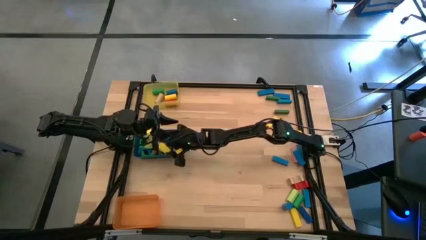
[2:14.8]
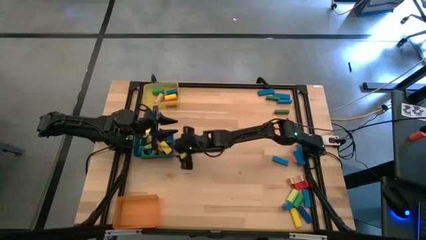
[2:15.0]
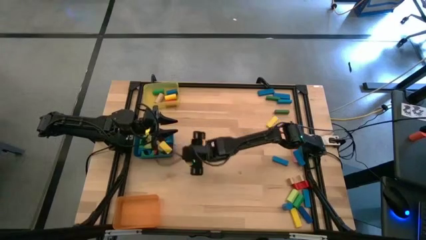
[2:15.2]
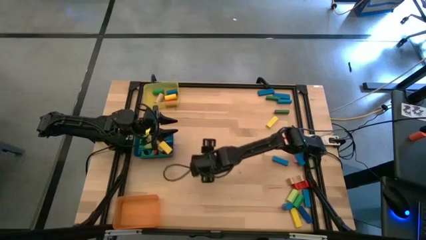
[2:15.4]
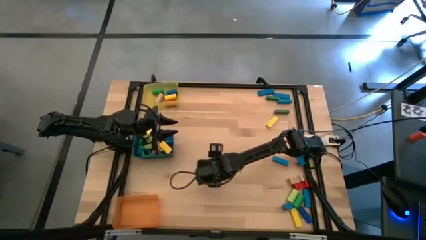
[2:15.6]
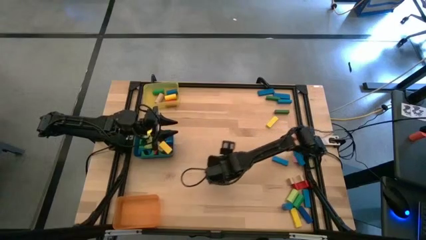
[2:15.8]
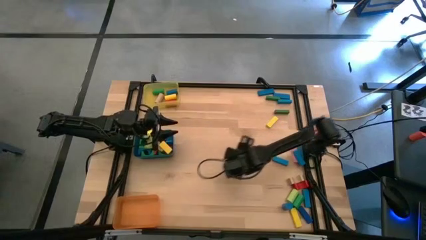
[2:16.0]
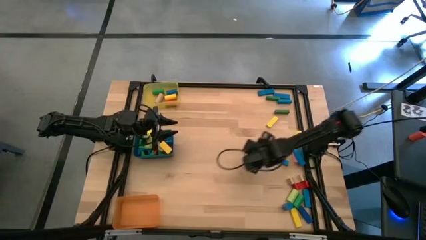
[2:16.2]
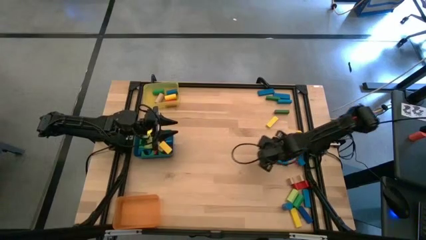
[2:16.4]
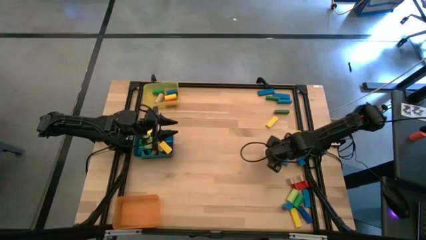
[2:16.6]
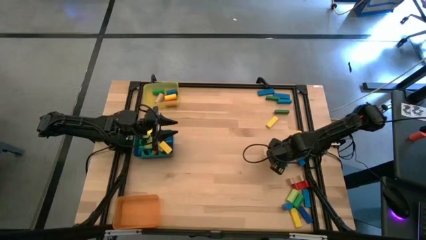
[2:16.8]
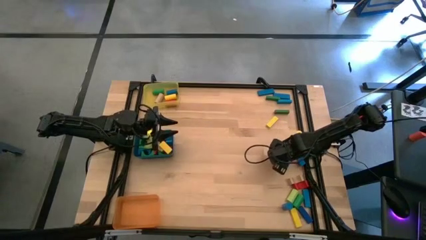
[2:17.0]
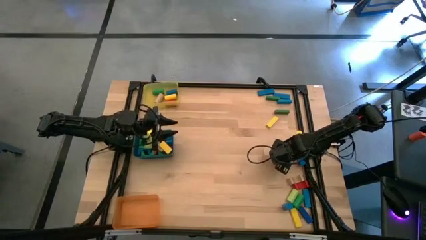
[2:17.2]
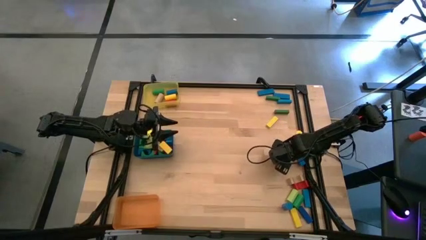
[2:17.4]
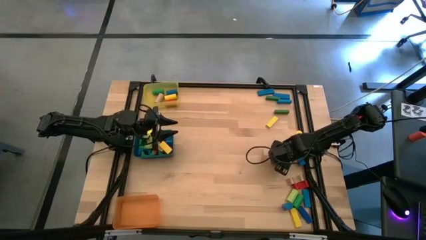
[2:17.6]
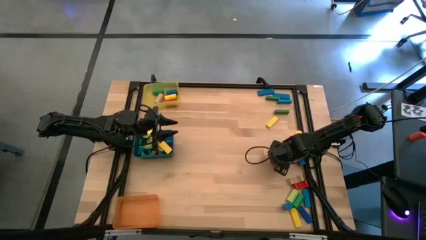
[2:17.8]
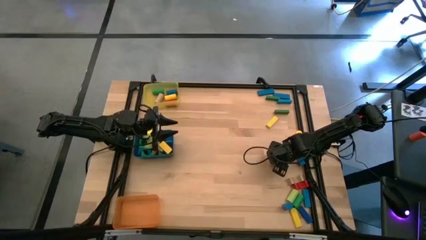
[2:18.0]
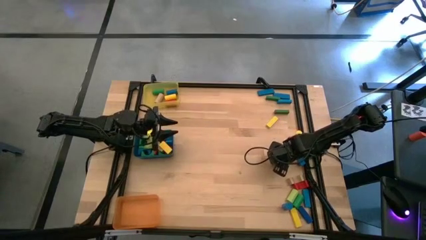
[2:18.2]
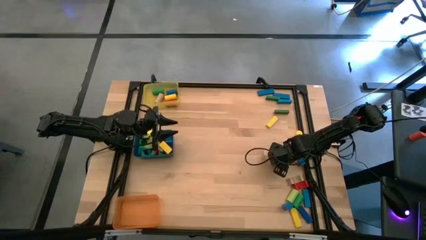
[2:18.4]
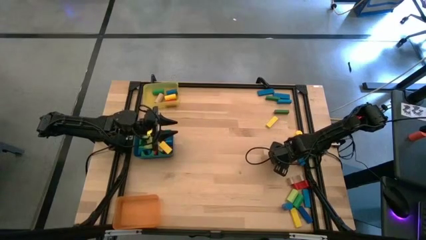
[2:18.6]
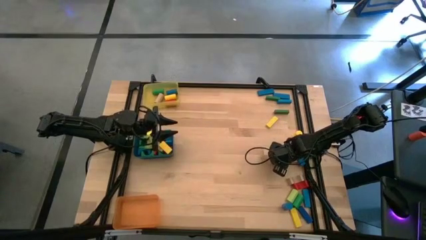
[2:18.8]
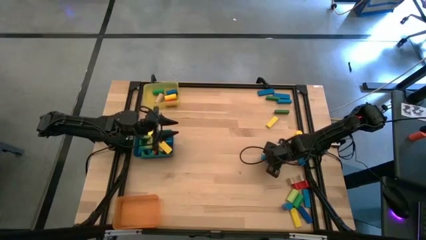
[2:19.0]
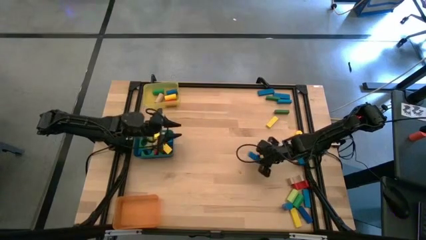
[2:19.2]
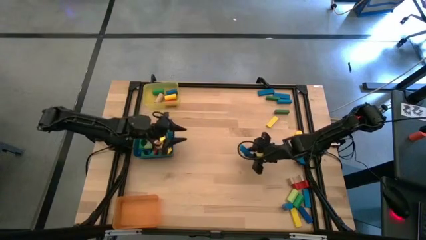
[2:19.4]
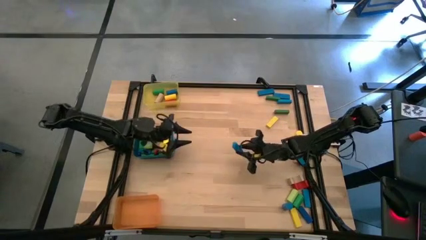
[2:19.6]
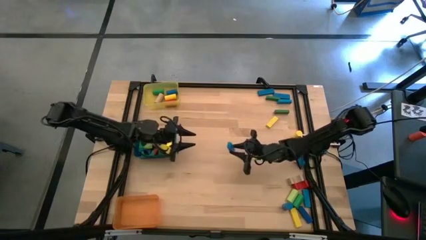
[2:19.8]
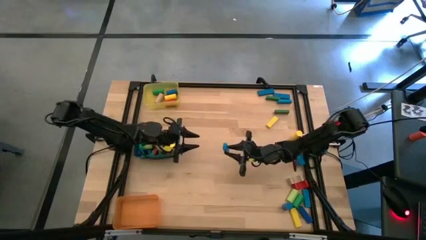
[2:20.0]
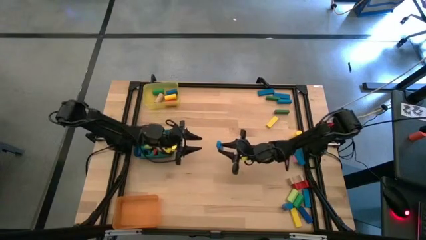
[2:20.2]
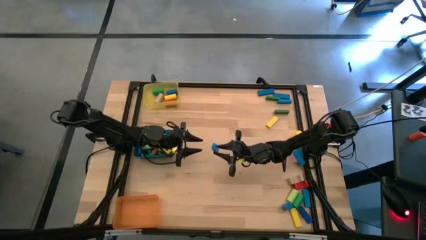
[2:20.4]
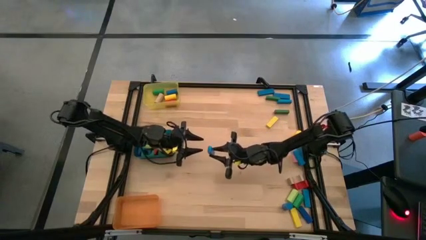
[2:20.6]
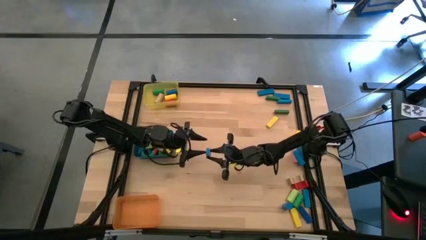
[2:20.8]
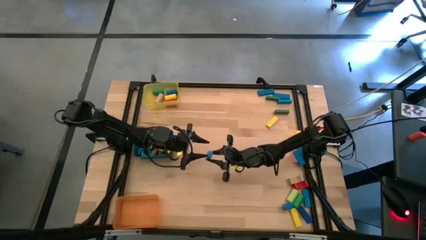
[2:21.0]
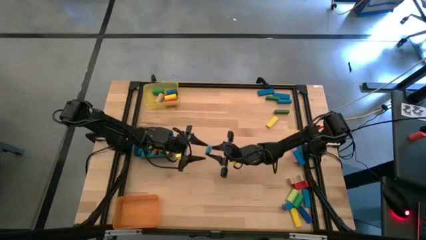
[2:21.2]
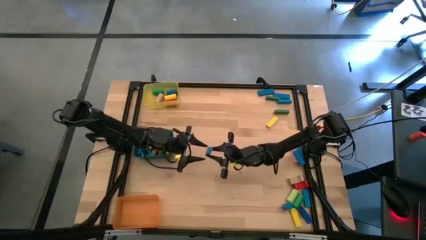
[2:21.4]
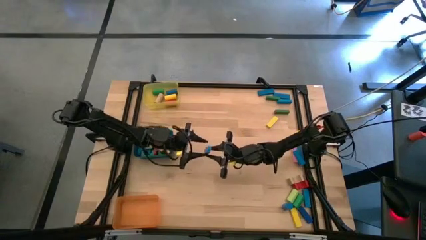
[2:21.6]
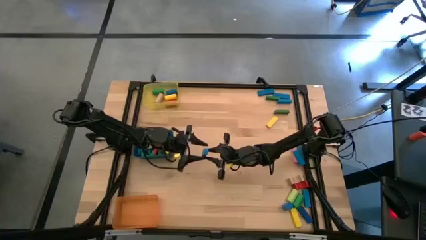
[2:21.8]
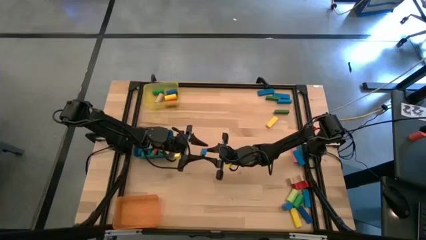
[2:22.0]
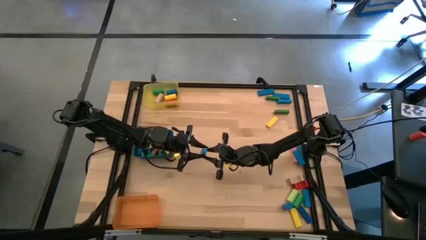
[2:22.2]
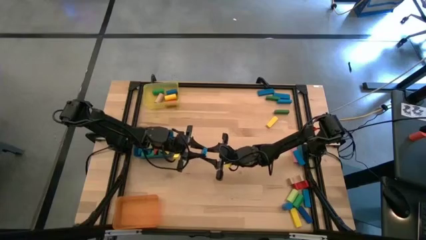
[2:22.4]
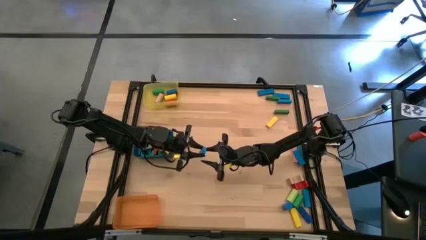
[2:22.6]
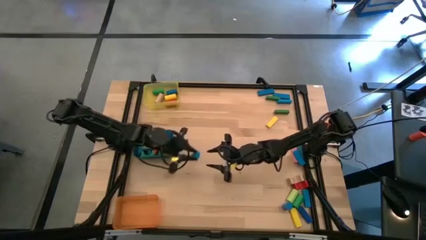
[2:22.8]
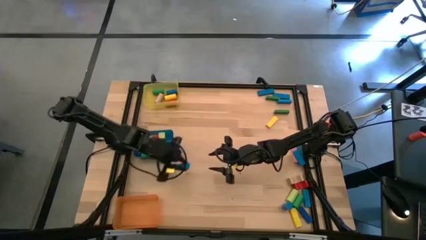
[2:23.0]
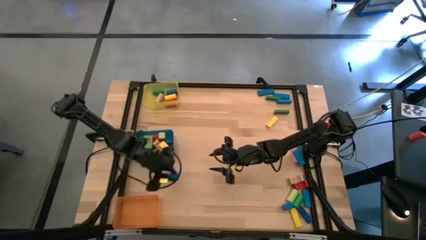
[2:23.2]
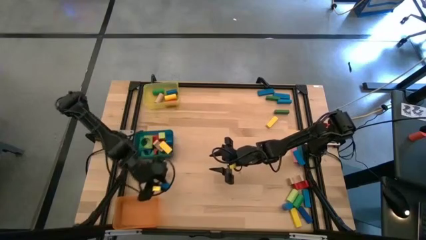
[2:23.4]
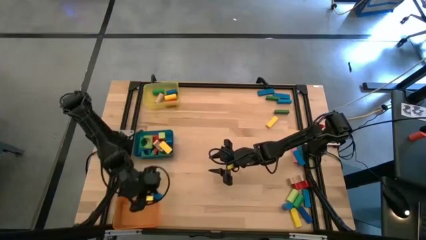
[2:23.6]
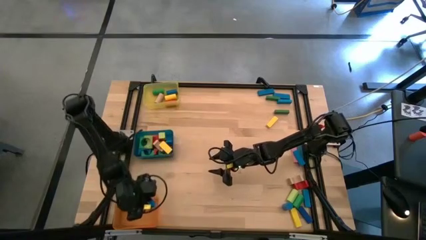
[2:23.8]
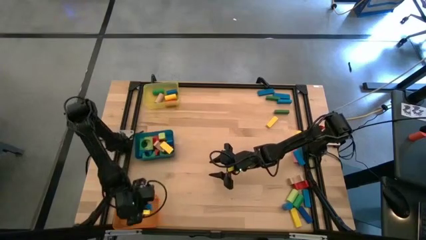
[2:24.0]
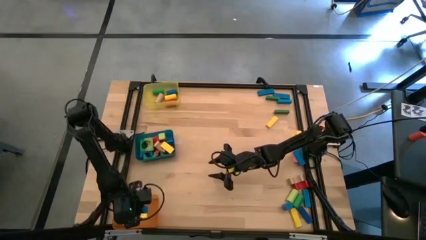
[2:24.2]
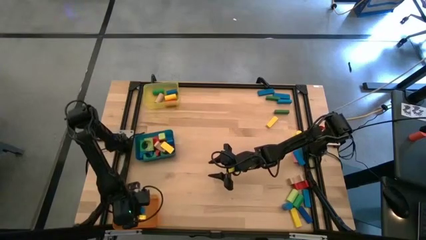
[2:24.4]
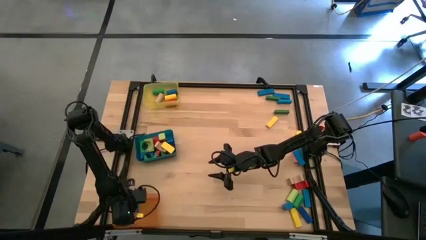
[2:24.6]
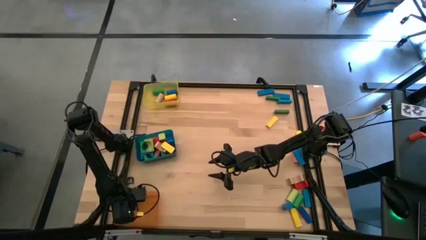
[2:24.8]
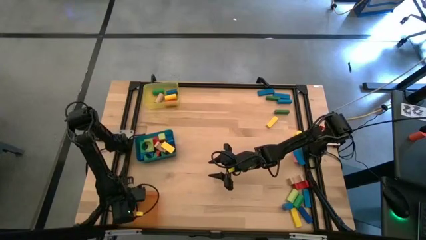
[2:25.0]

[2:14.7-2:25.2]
Task: Sort blocks by size
Put the blue block into the orange bin

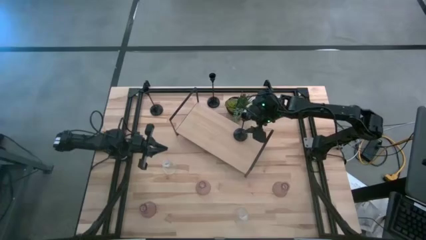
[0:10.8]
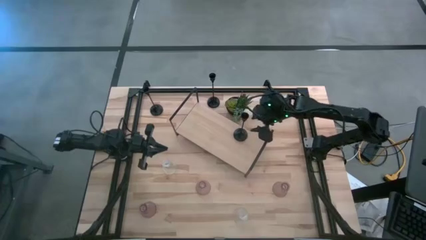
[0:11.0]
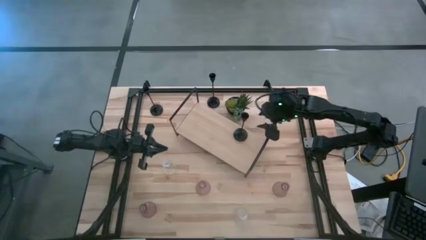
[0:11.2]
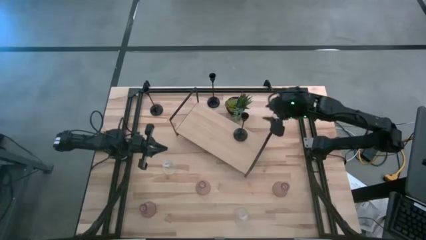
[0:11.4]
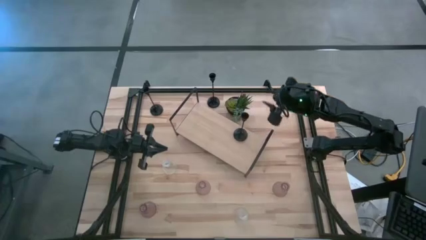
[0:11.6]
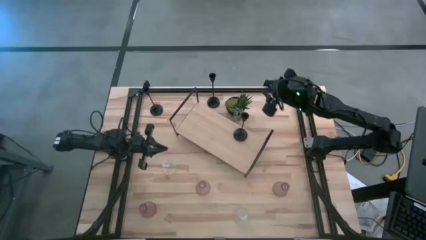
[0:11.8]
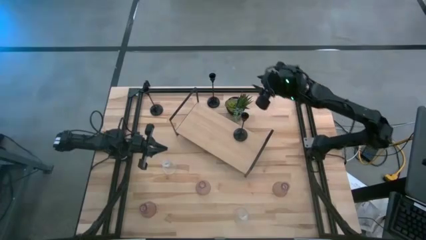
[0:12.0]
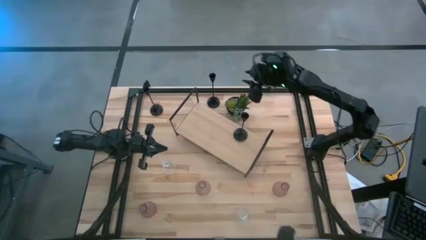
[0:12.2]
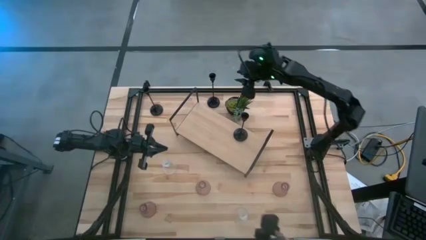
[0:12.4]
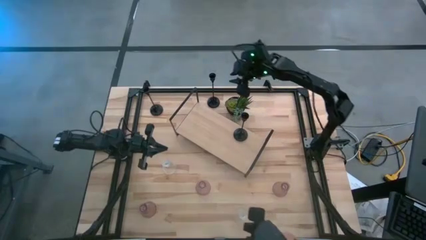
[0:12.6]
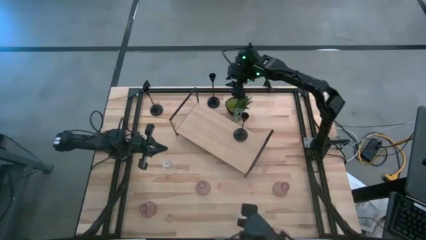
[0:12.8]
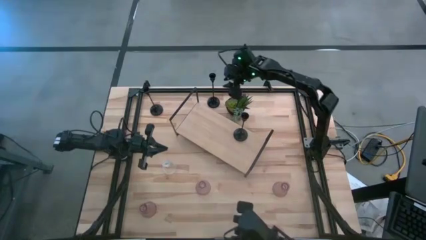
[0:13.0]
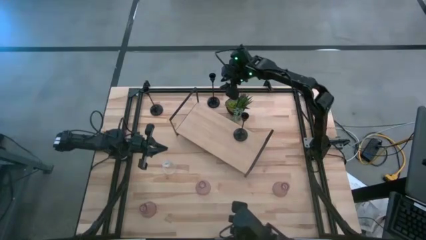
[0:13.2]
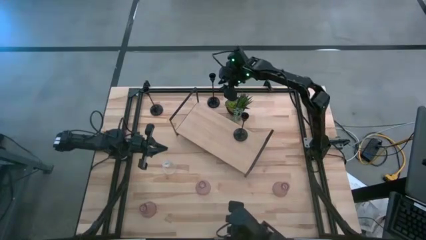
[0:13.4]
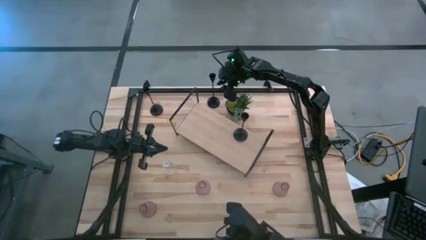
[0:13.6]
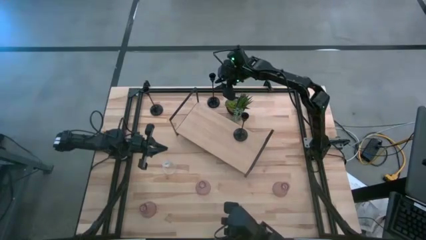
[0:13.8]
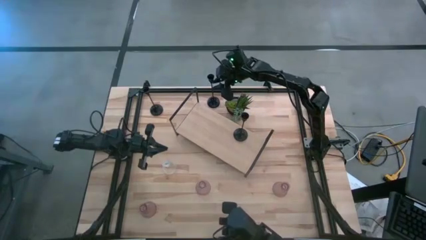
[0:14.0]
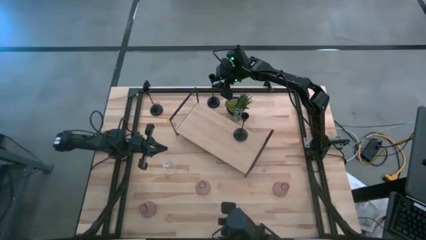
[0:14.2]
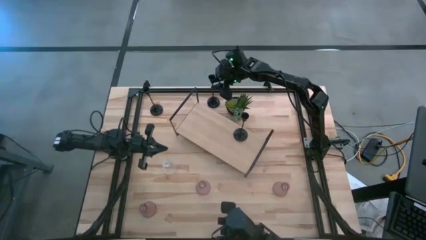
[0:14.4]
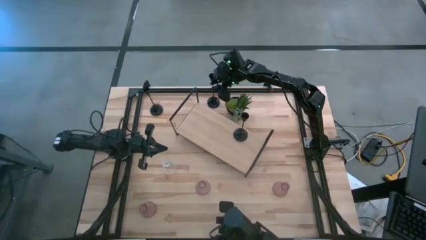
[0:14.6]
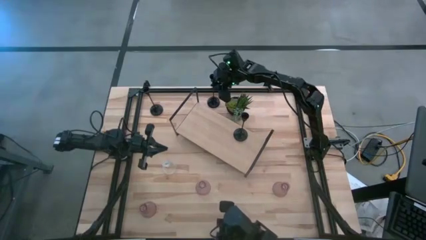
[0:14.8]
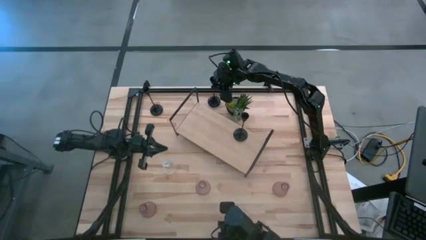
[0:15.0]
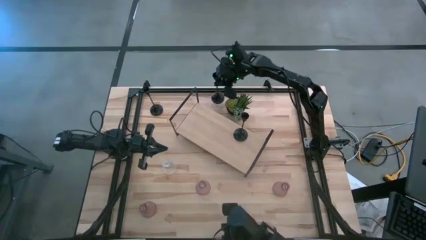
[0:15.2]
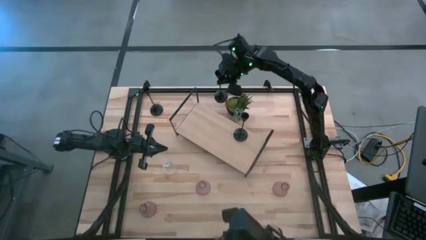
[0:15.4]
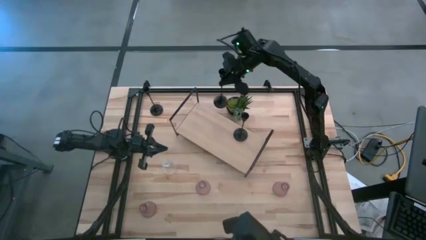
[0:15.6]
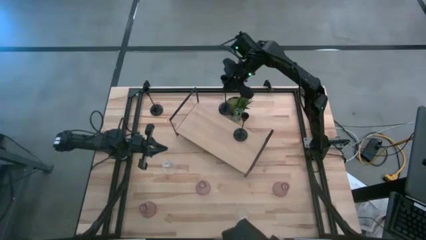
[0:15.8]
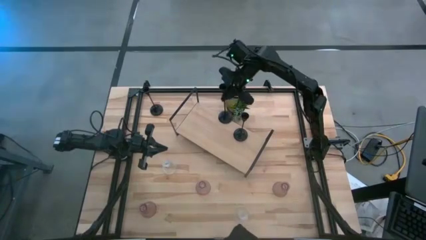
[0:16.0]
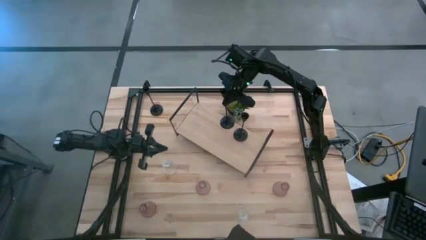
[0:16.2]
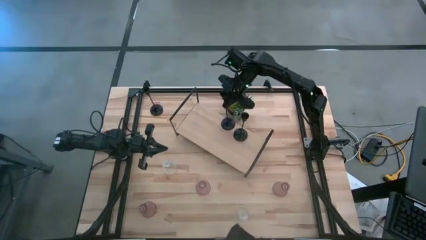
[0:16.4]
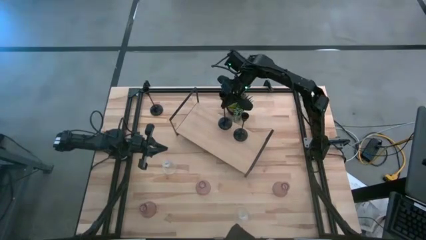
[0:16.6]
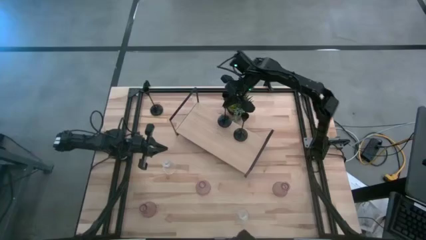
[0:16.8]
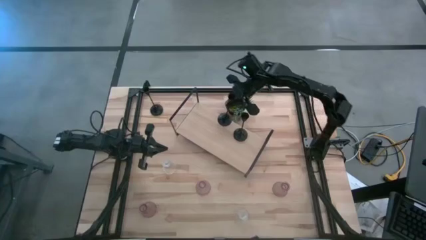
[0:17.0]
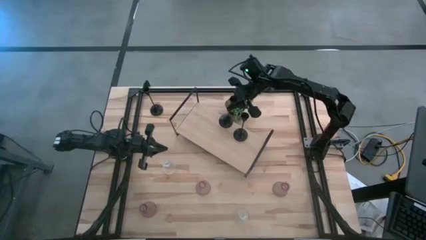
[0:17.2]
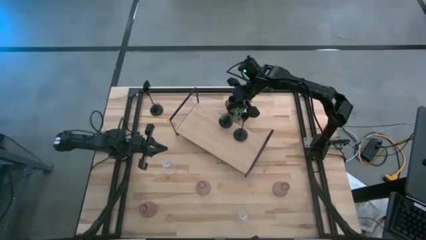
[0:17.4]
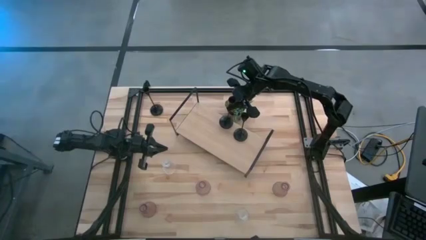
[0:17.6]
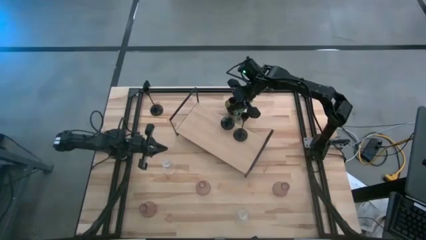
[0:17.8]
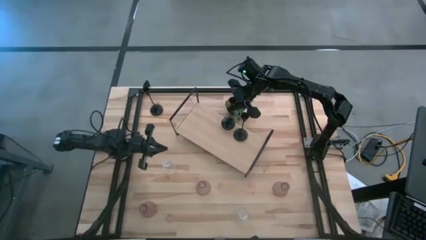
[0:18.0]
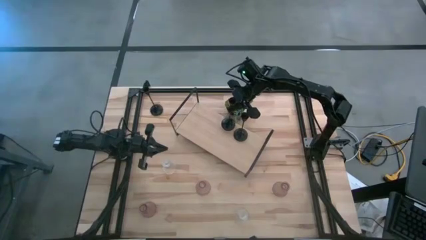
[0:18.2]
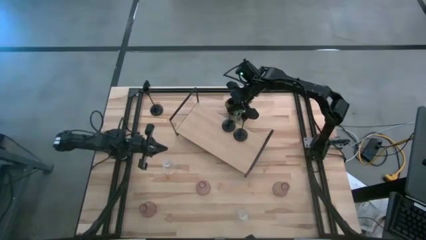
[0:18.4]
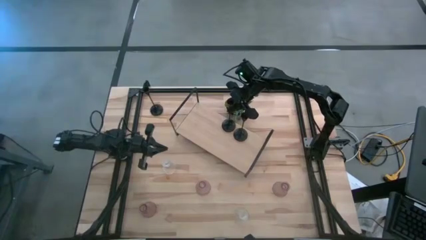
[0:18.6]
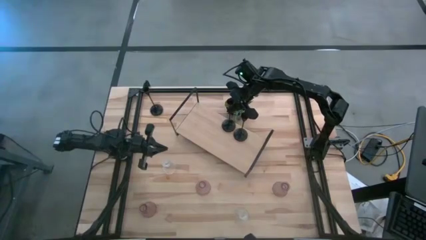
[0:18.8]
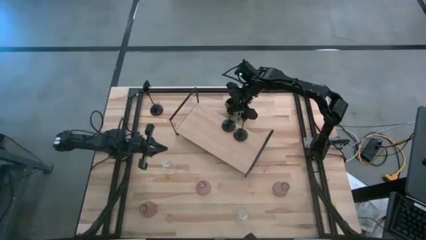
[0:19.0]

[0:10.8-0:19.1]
Task: Pick & Place candle stick holders
Put the right black candle holder on the shelf
